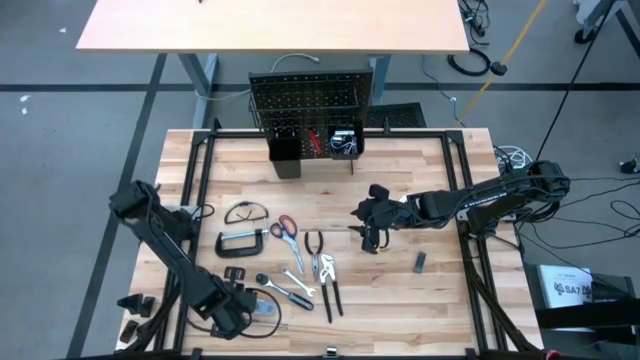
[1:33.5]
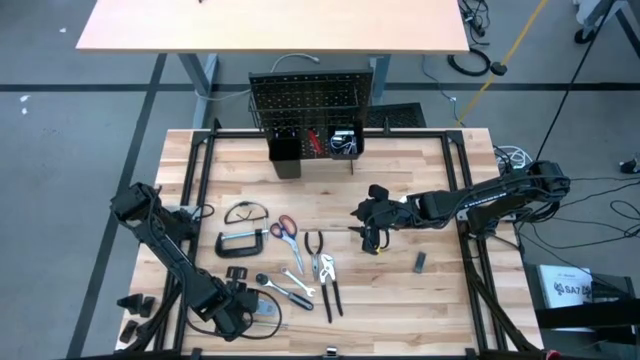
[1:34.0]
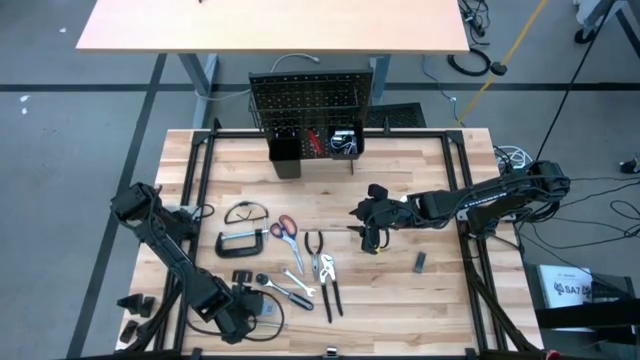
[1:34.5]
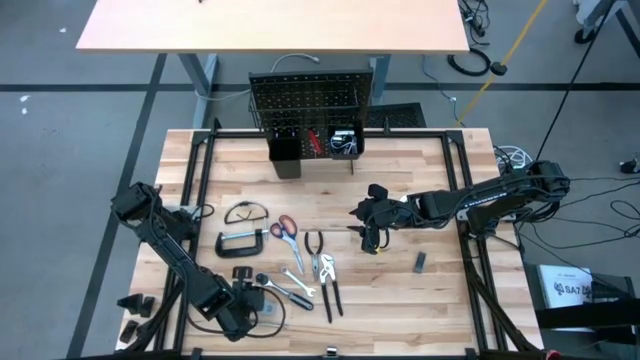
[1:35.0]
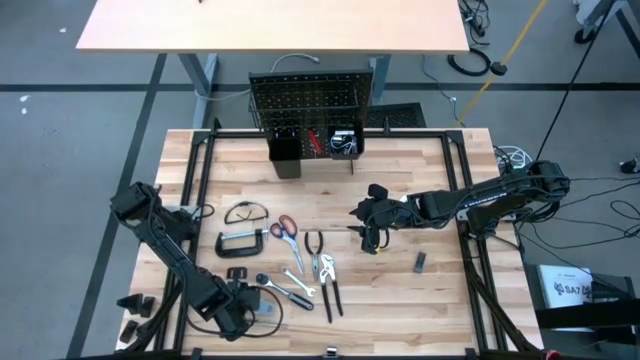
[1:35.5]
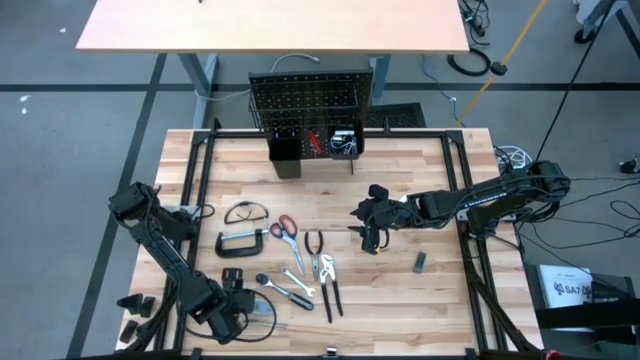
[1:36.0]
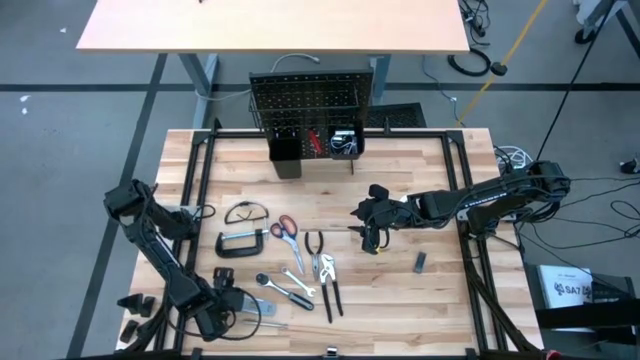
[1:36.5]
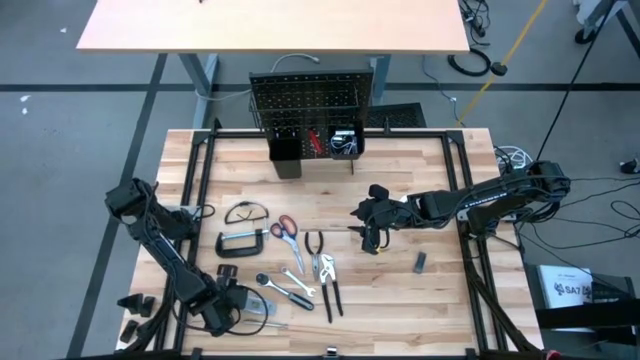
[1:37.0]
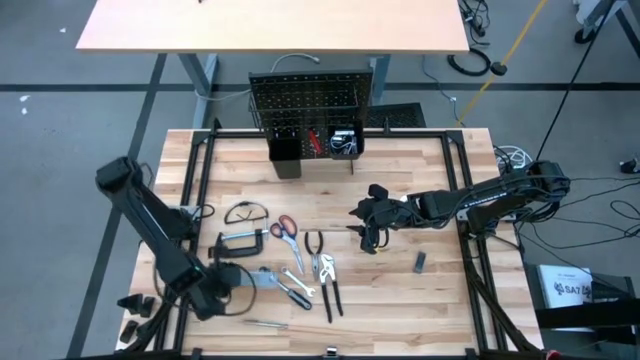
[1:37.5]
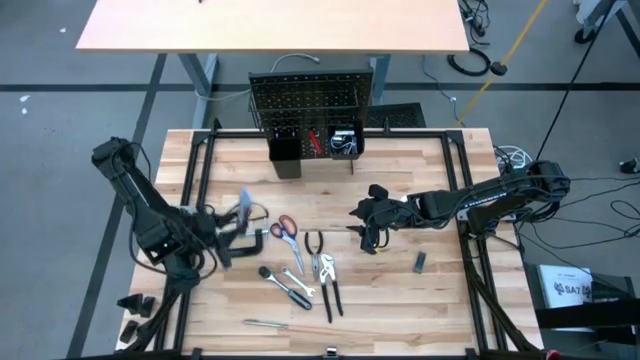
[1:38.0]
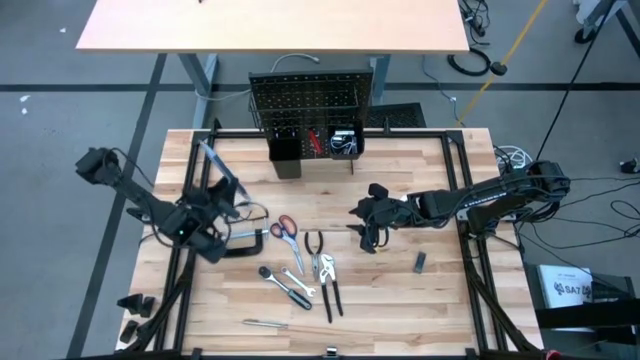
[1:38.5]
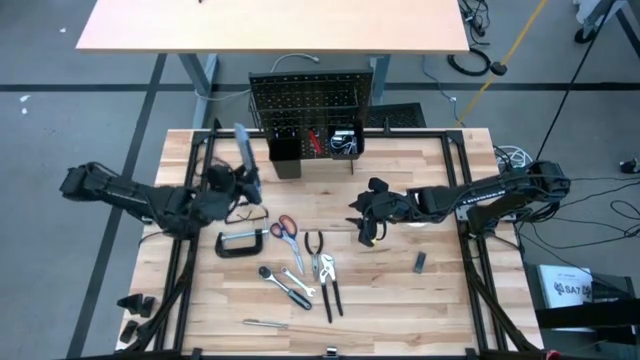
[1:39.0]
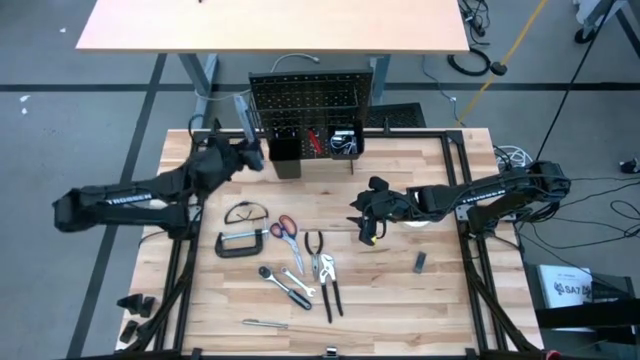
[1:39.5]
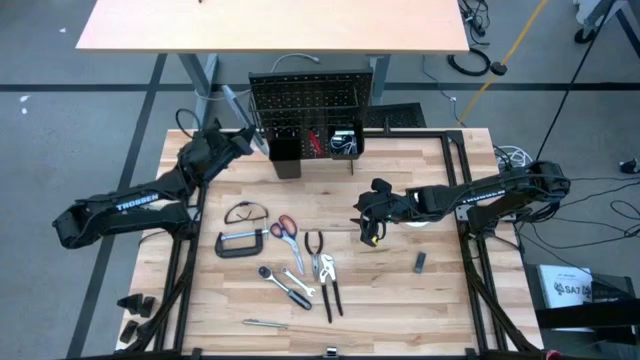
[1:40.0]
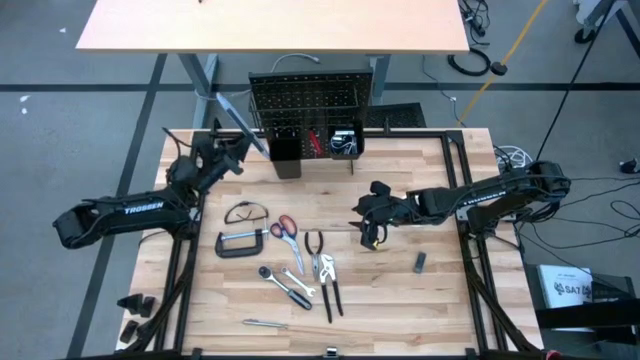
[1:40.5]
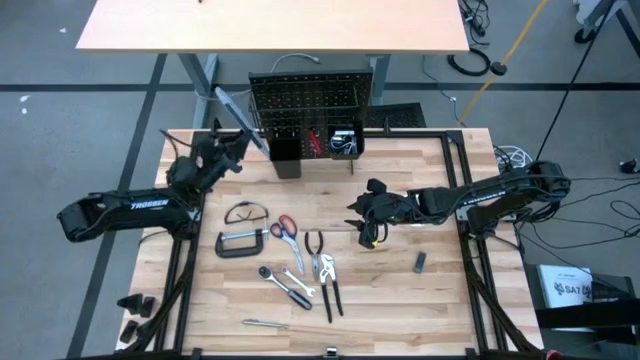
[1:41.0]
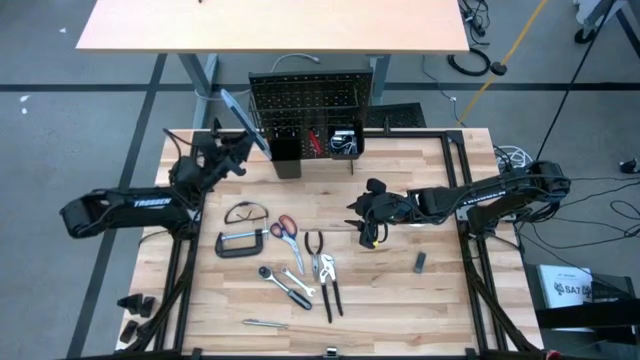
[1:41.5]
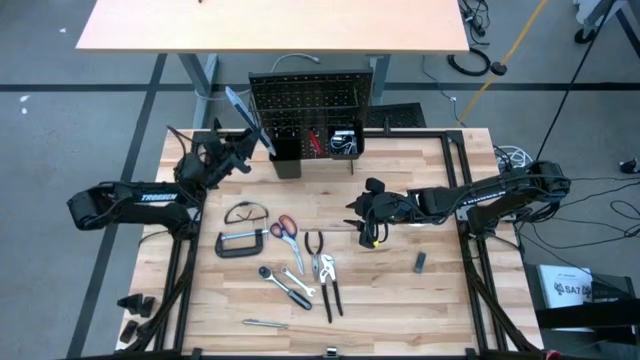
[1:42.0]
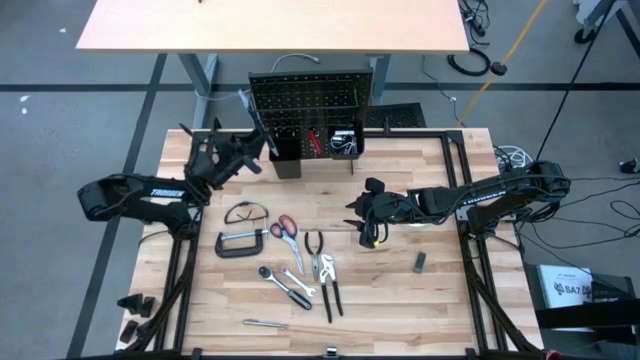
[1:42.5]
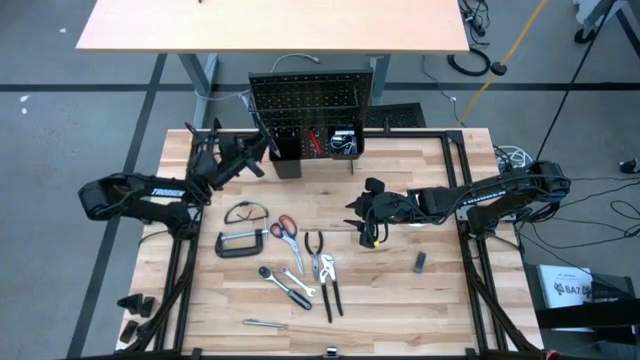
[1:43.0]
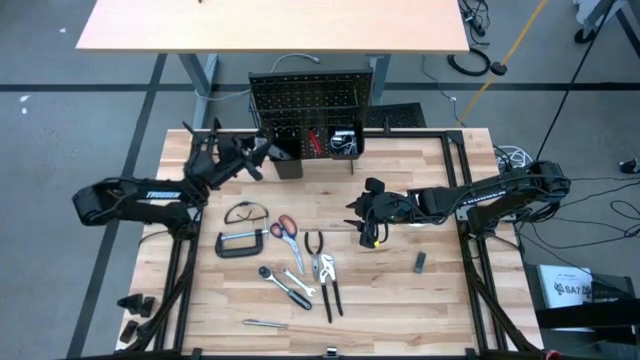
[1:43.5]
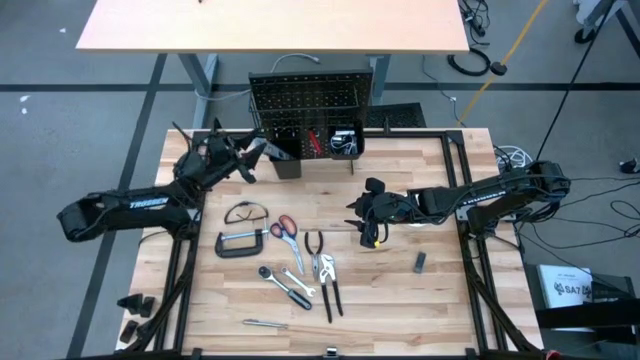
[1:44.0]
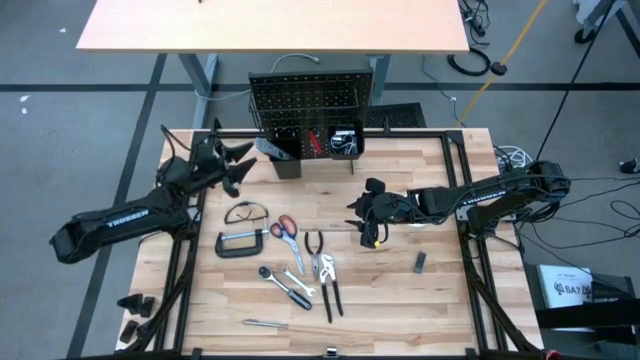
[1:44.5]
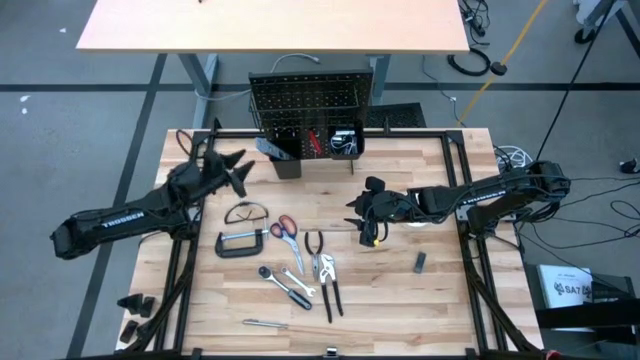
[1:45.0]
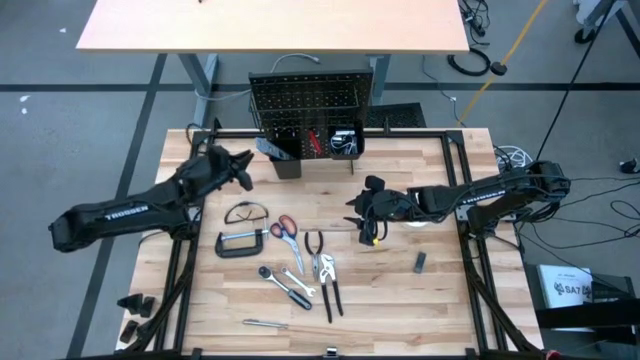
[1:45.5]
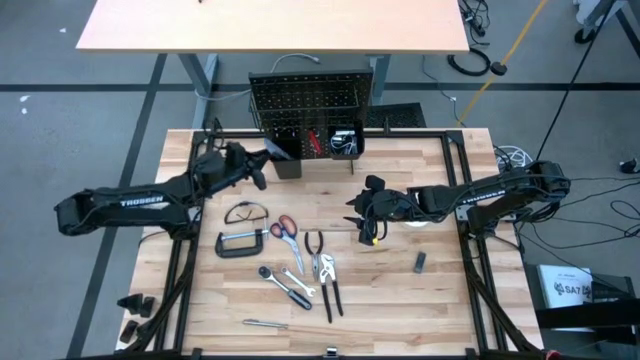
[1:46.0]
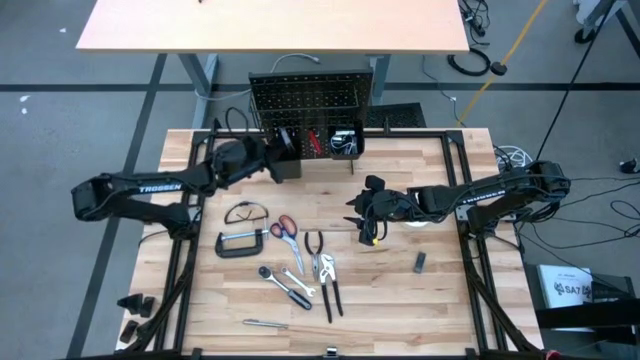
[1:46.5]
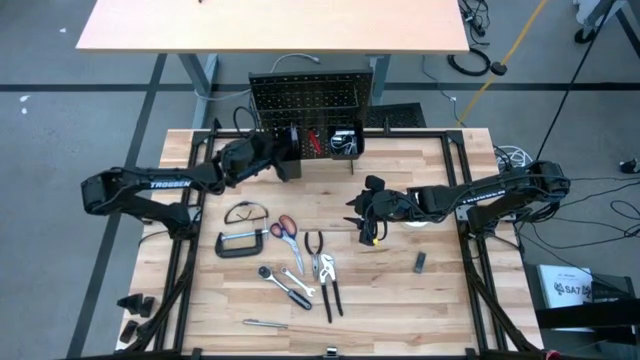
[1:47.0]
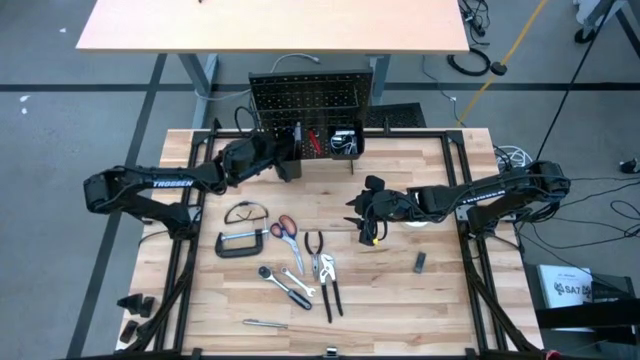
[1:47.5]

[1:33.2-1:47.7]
Task: Hang tools onto peg board
Put the spirit level on the left black bin on the peg board

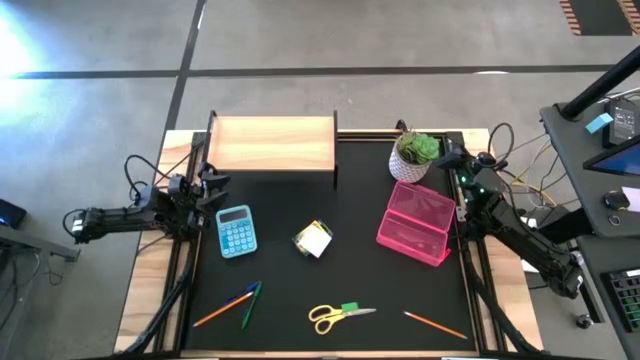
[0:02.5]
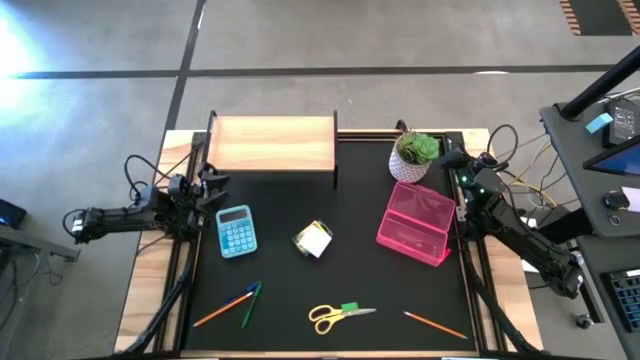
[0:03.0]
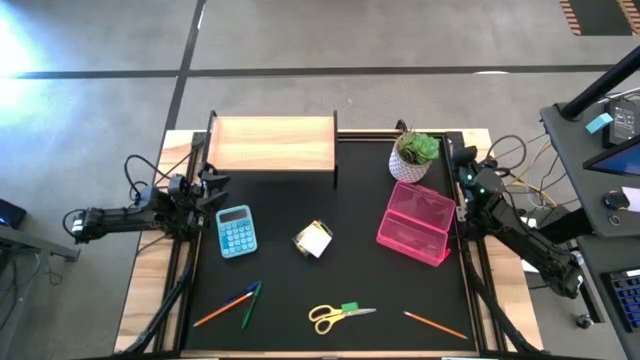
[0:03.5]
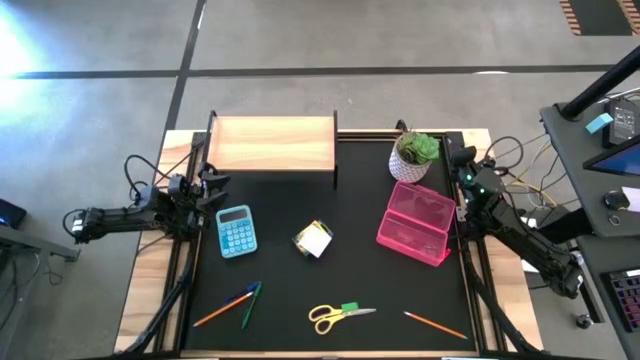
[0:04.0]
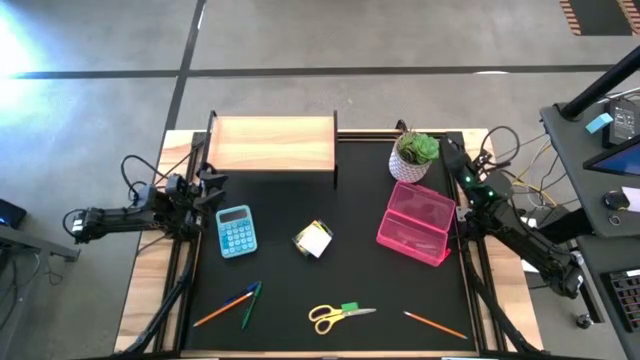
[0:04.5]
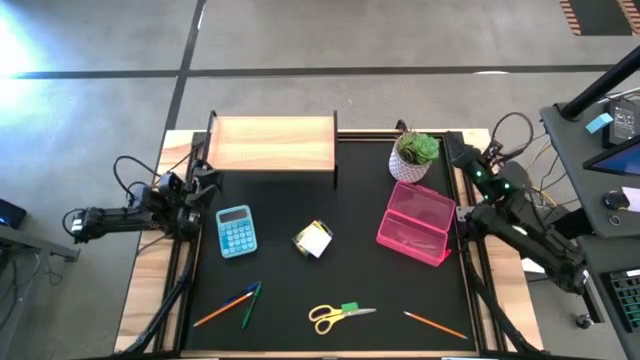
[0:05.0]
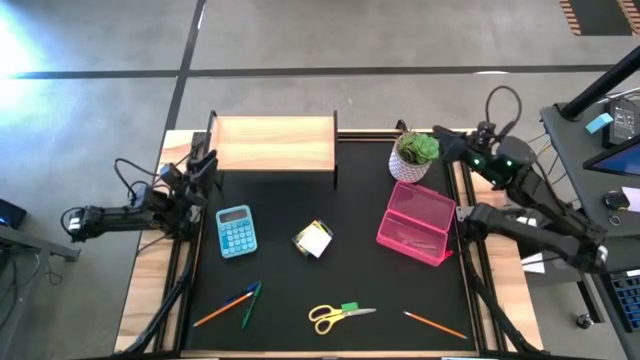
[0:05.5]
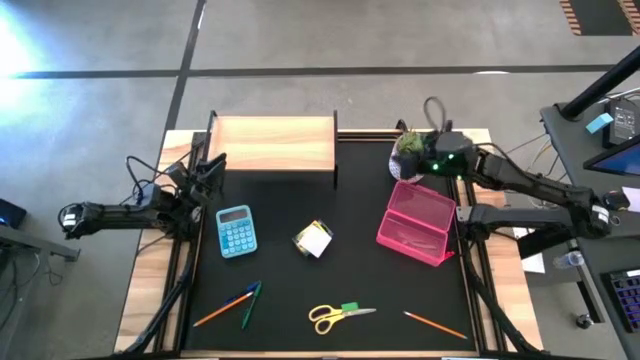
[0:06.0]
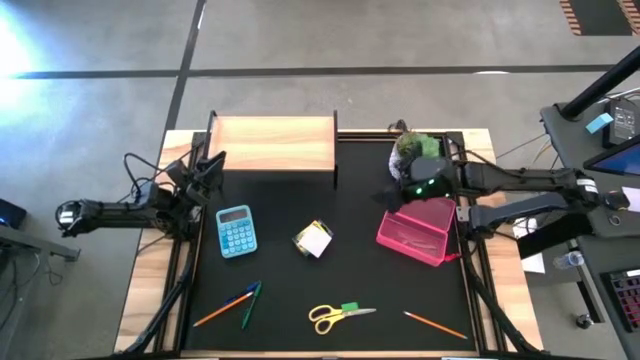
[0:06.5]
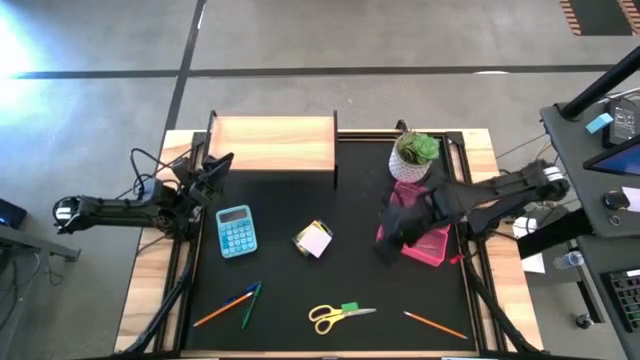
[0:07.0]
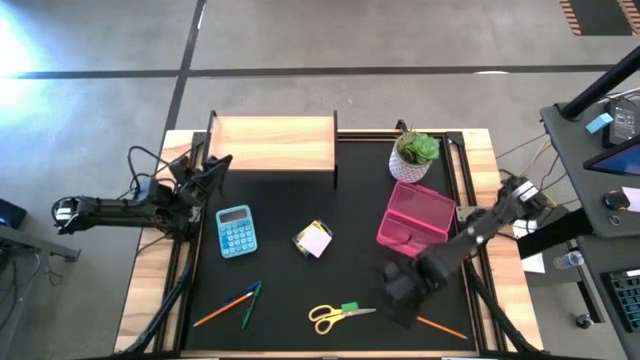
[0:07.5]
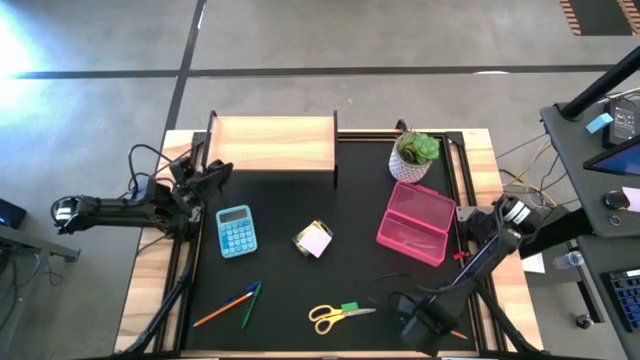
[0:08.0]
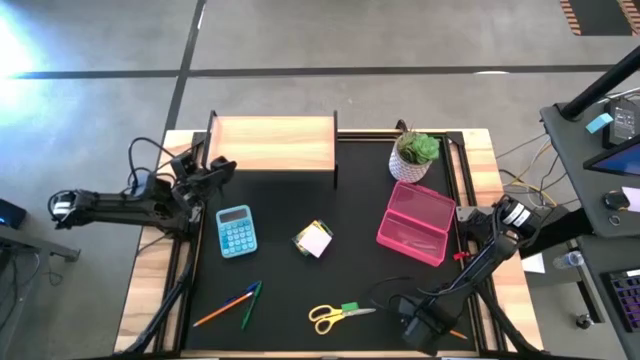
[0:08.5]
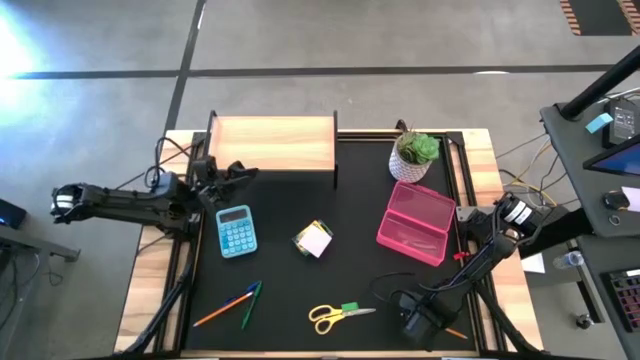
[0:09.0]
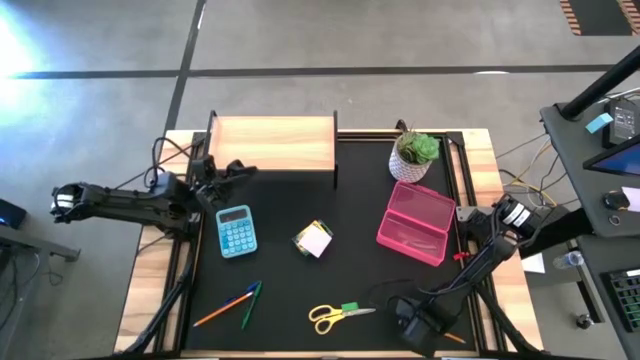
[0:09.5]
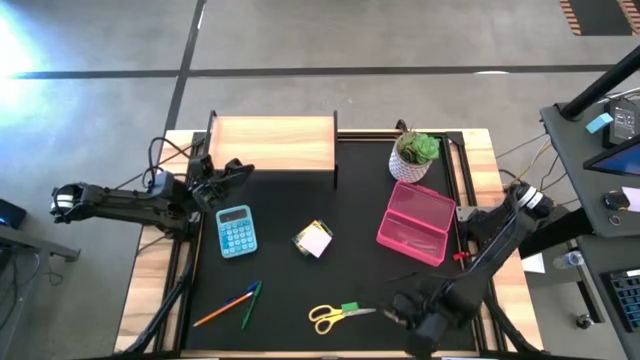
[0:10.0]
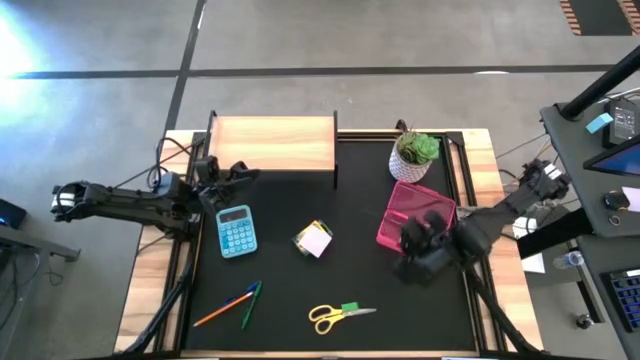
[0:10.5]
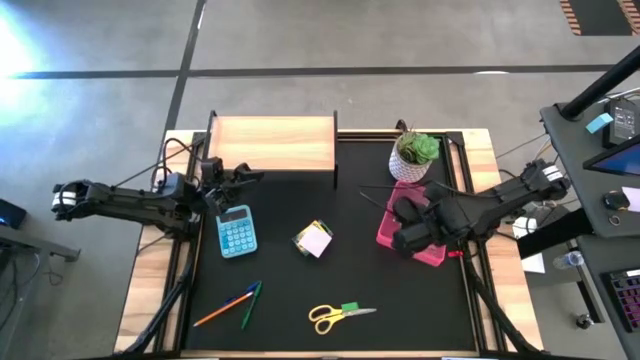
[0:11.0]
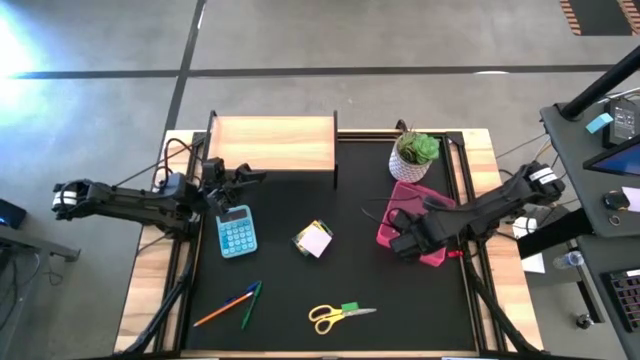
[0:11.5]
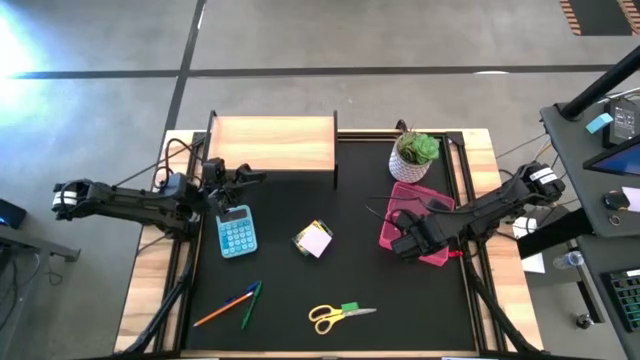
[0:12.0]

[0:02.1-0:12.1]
Task: Pack school essentials
Put the right orange pencil into the pink supply box
